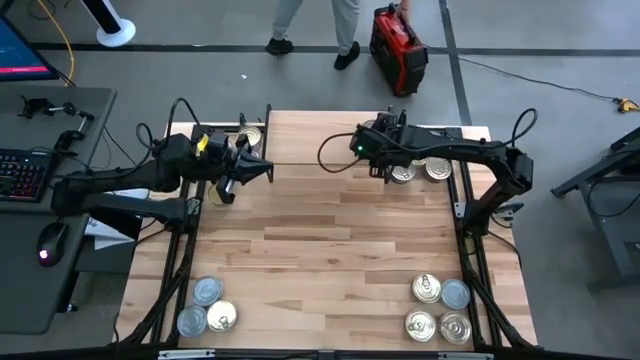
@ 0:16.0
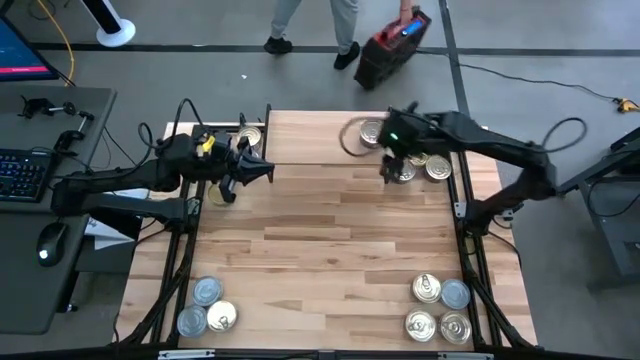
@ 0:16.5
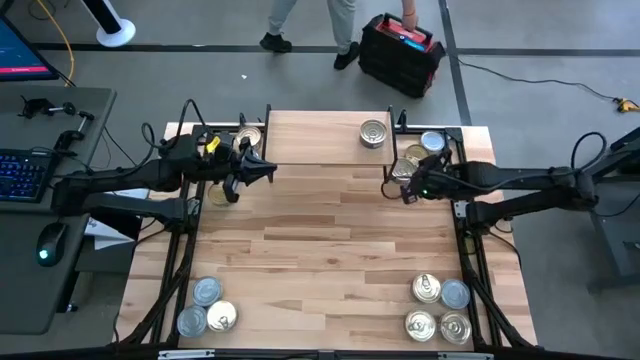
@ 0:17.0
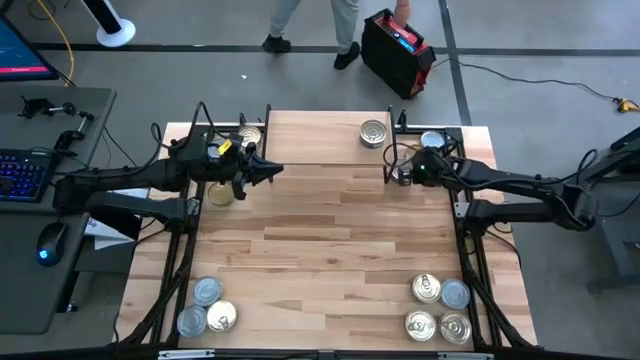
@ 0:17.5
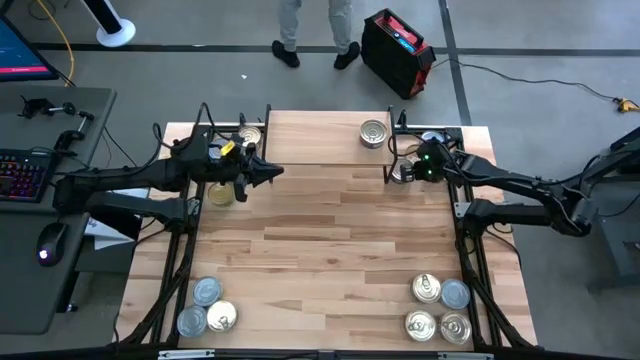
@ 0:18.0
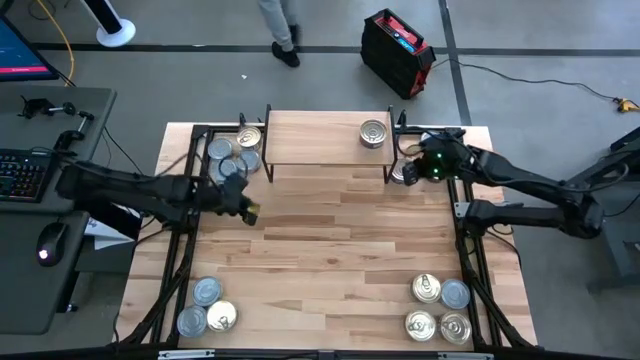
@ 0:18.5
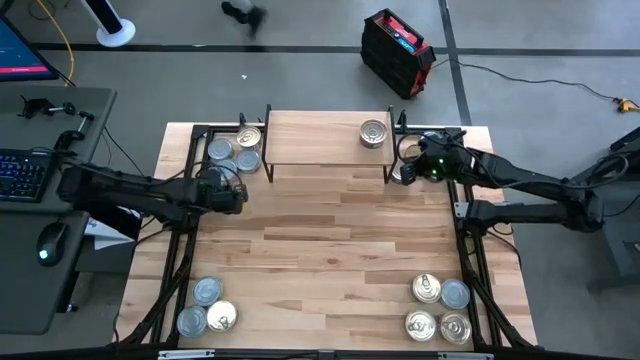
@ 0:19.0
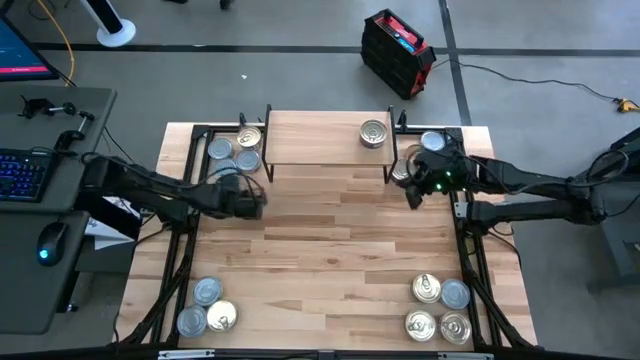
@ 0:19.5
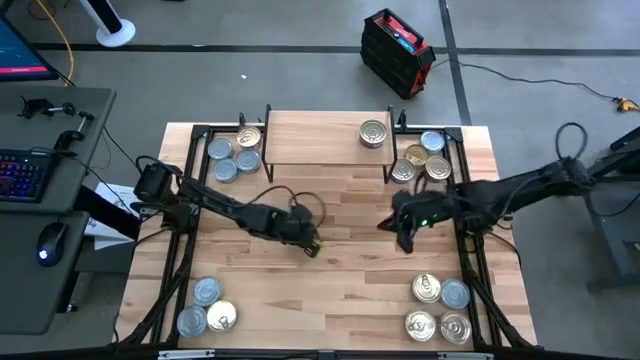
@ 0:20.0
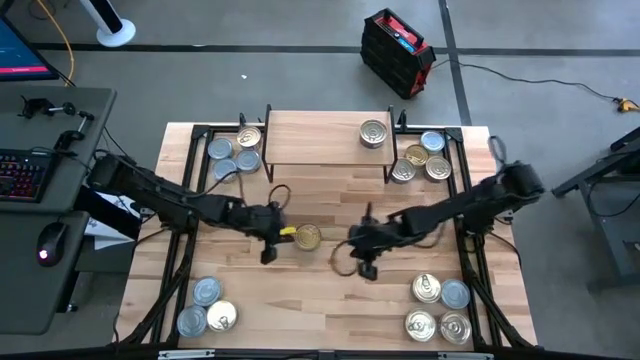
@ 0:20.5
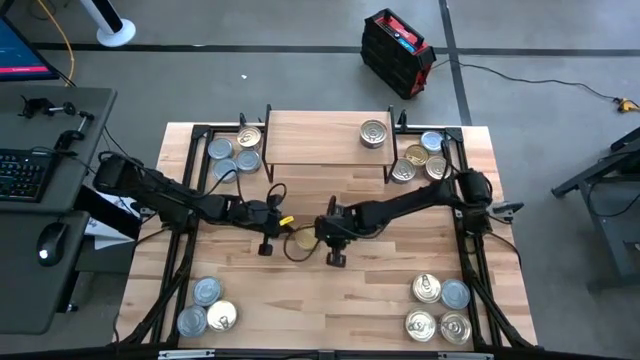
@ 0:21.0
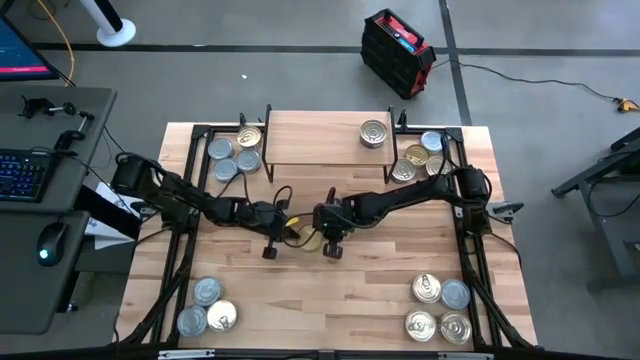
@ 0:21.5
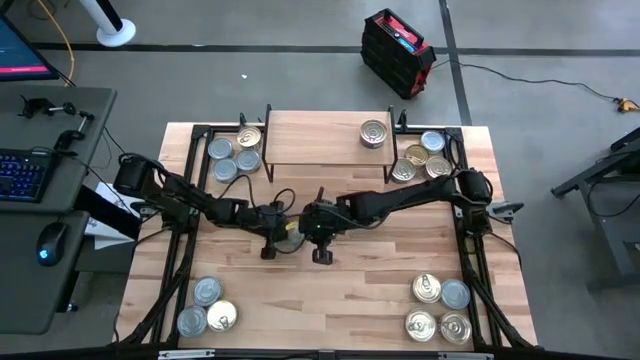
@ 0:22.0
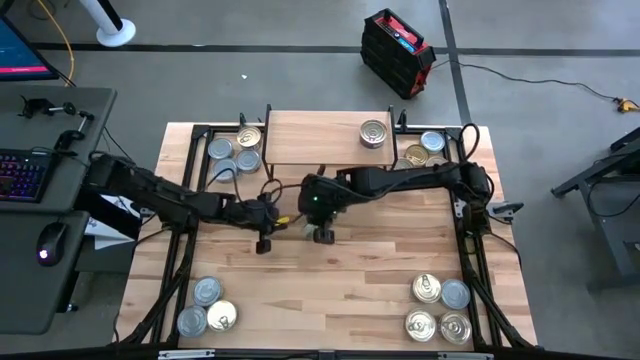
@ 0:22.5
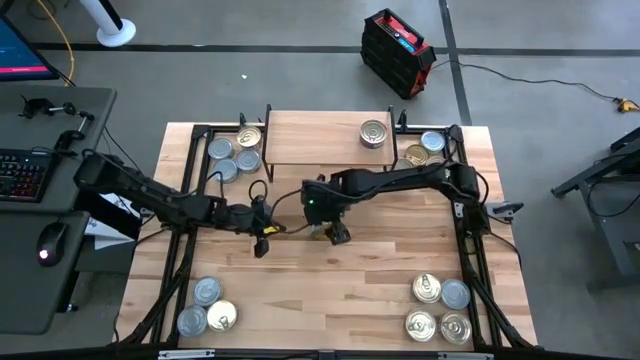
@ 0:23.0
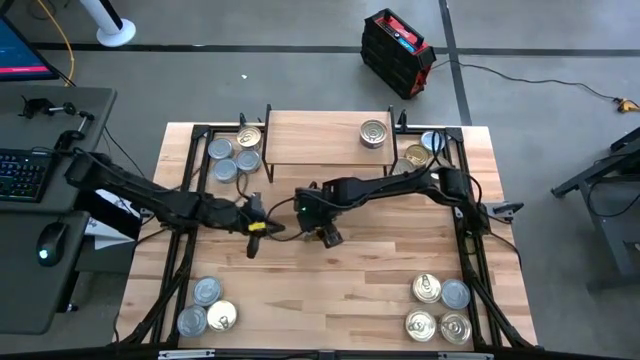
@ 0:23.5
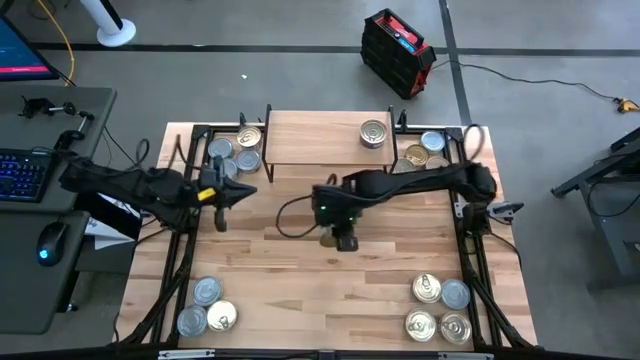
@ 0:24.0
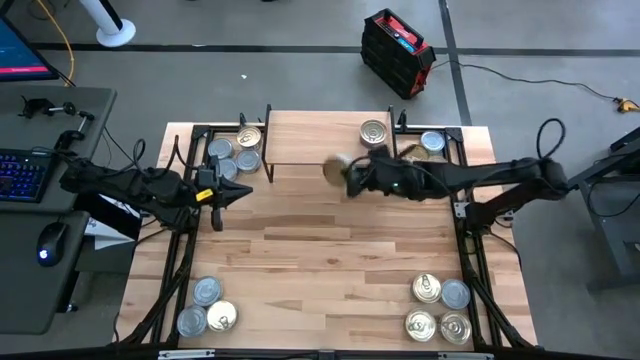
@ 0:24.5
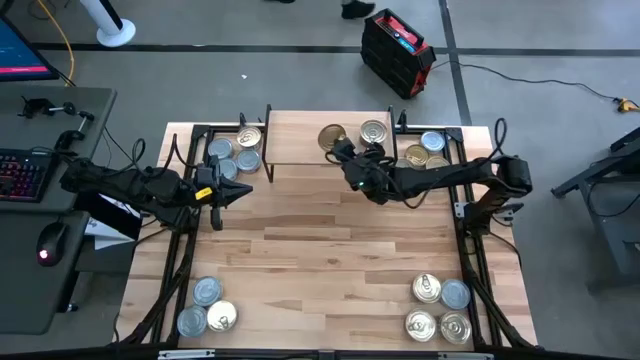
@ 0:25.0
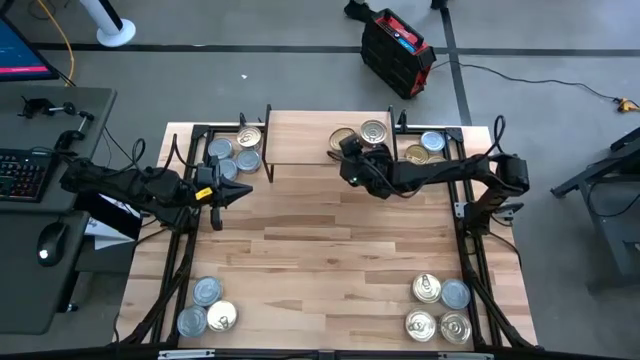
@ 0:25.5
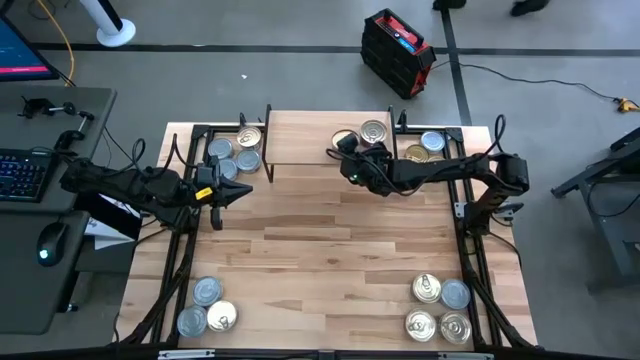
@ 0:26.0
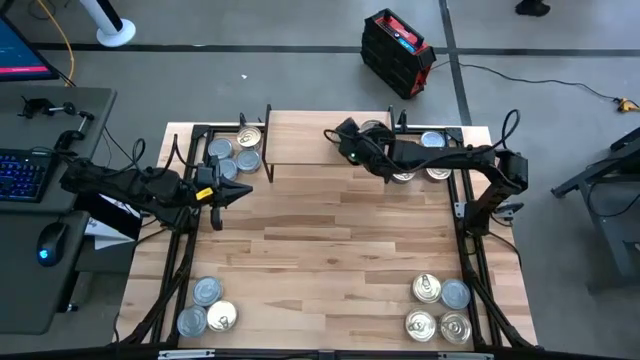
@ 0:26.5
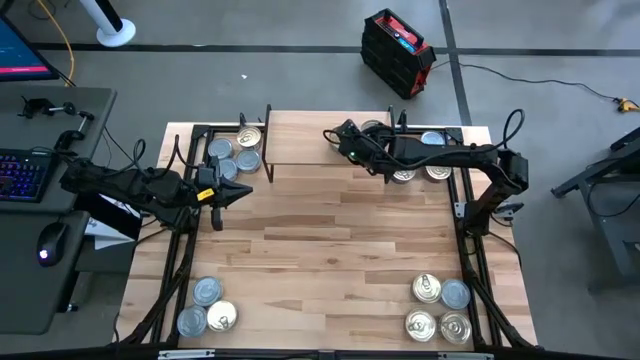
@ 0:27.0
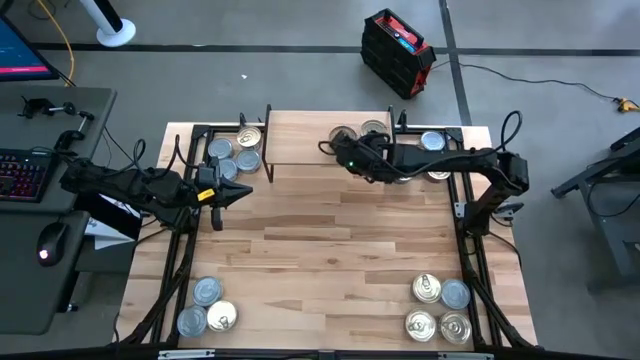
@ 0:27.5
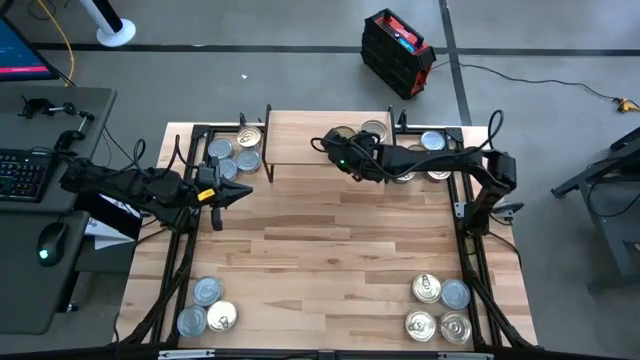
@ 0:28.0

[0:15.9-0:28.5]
Task: Stack canned seafood by type on shelf
Put the green tuna can on the shelf

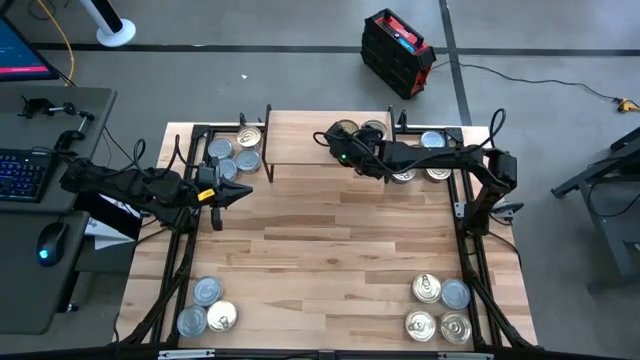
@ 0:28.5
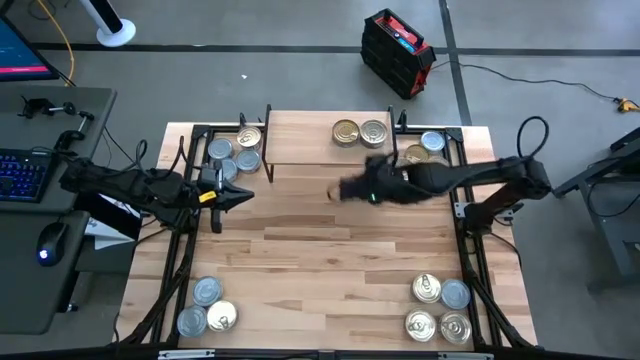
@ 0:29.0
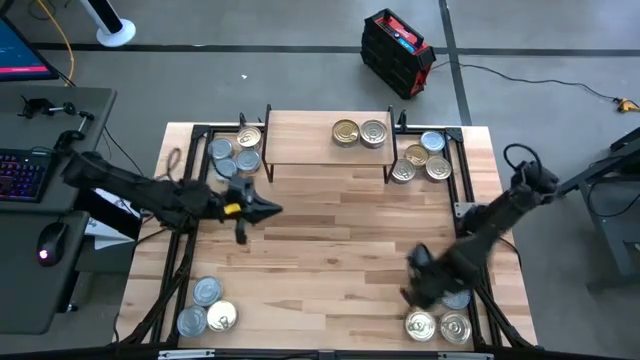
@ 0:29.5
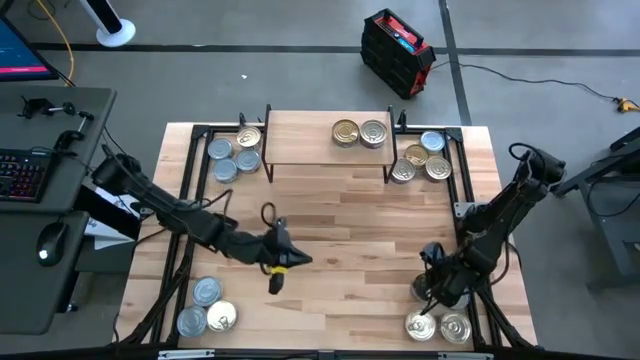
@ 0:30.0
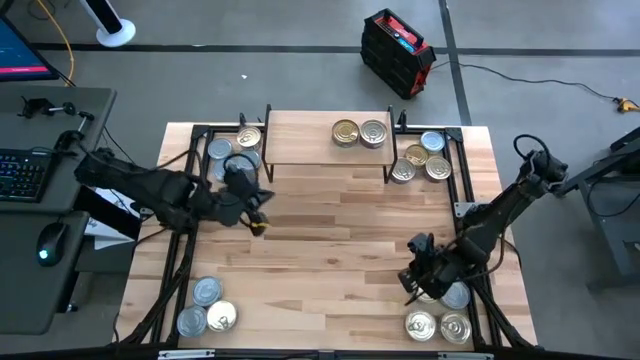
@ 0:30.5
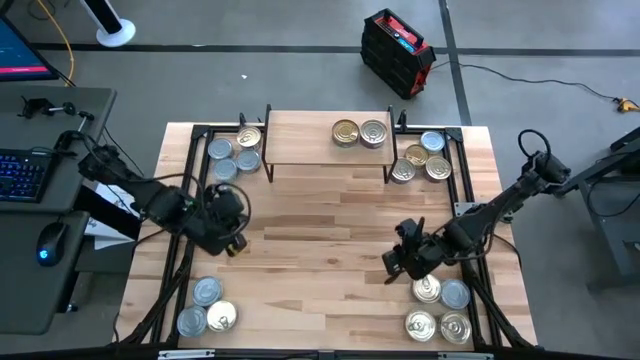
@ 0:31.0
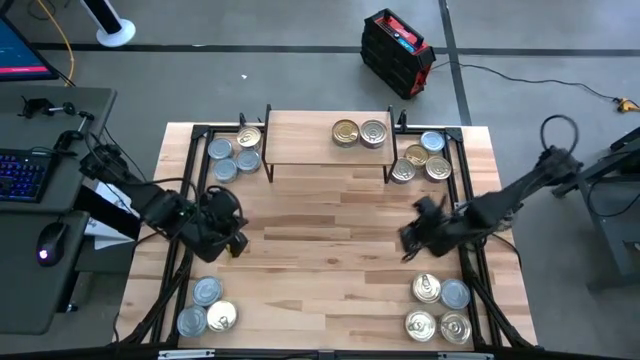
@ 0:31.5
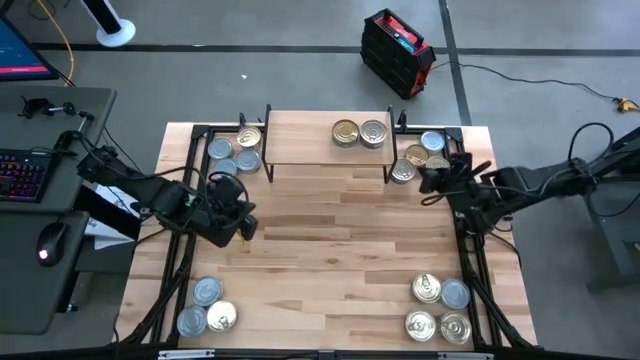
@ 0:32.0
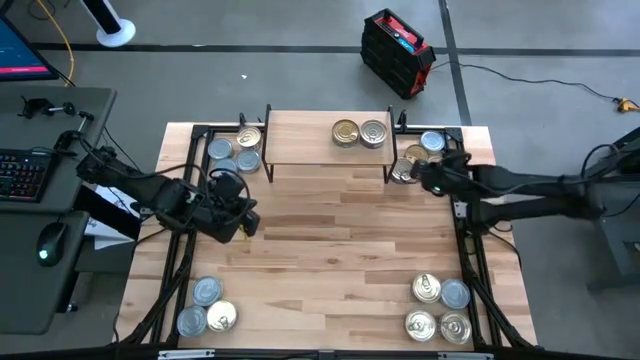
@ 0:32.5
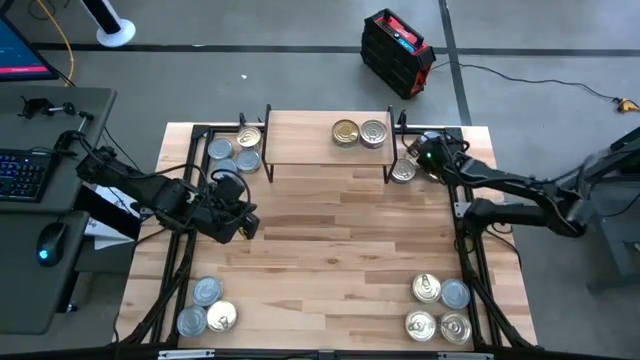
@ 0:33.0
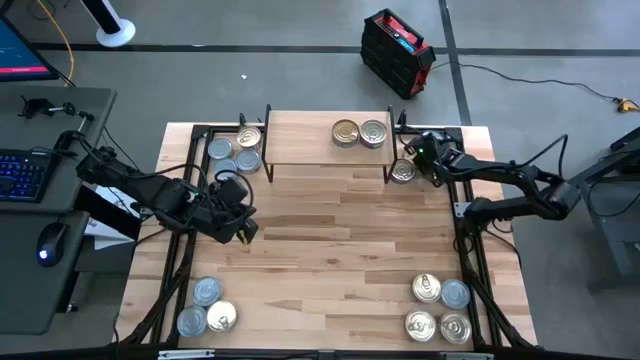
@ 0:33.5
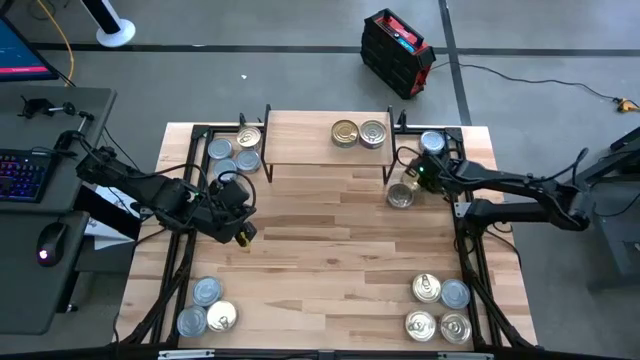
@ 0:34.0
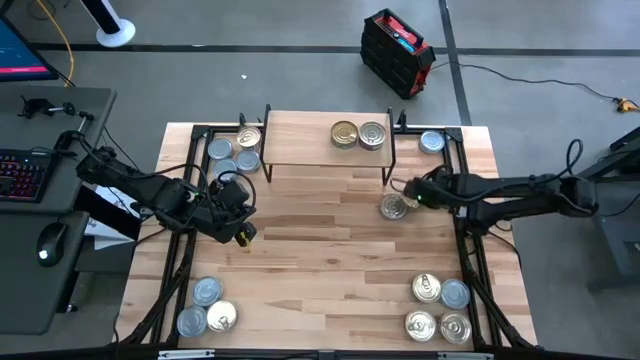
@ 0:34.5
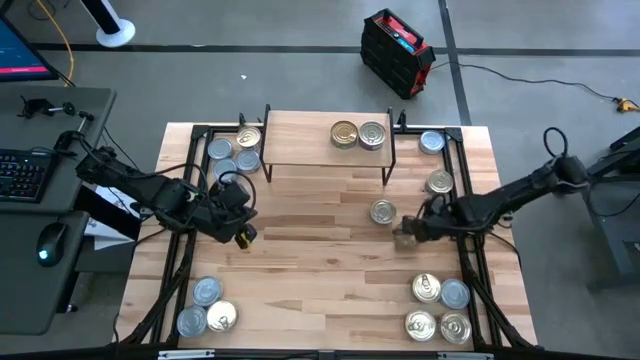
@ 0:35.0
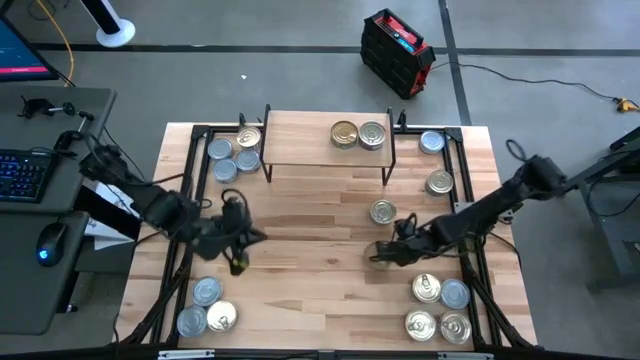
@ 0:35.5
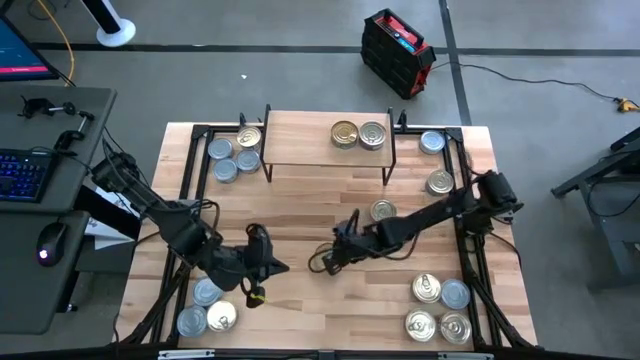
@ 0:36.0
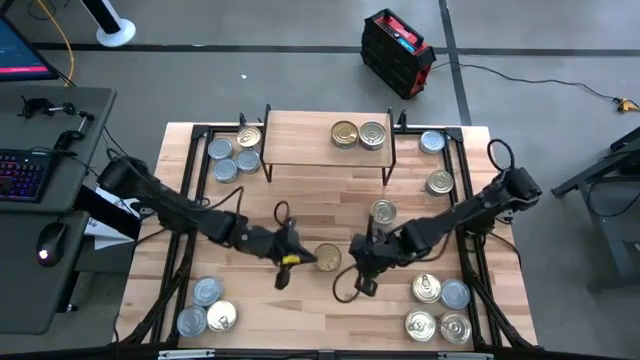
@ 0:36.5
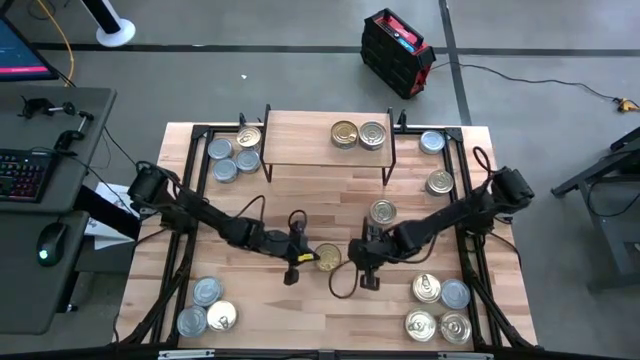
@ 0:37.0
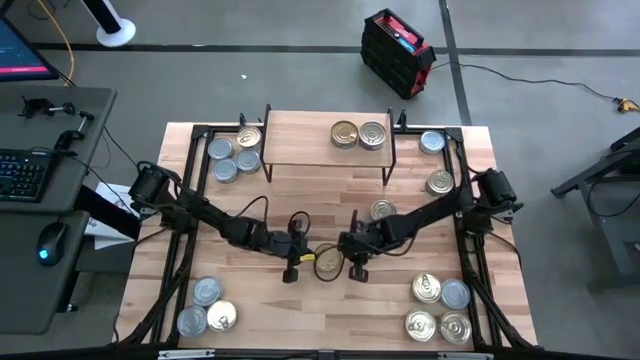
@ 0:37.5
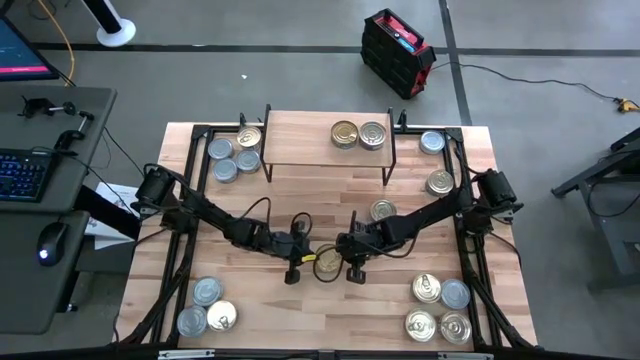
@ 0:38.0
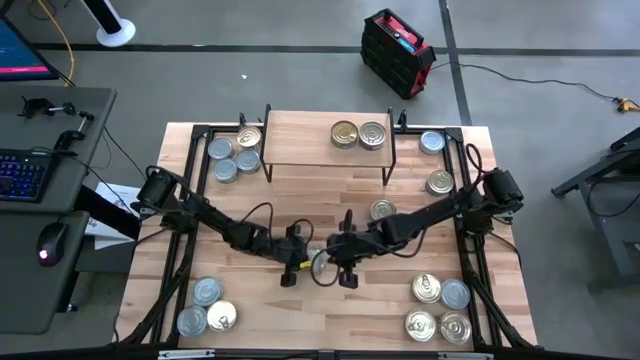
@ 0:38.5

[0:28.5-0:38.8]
Stack the green tuna can on top of the green tuna can on the shelf
